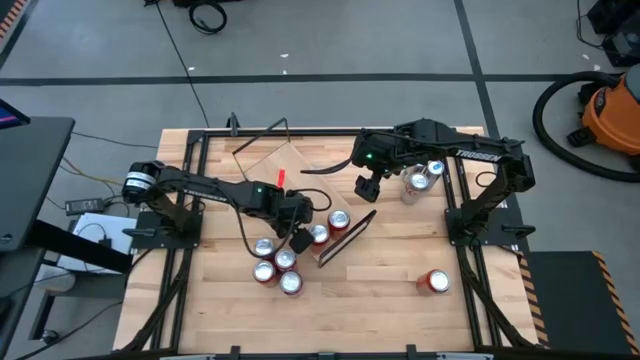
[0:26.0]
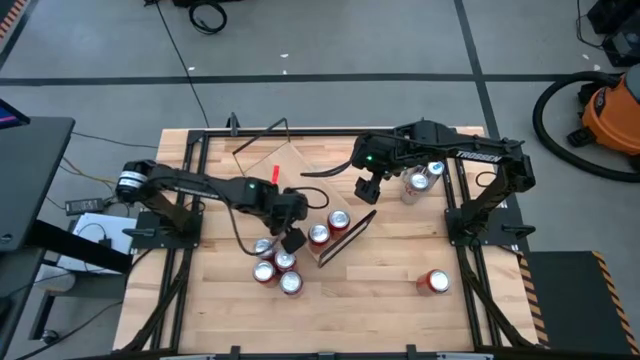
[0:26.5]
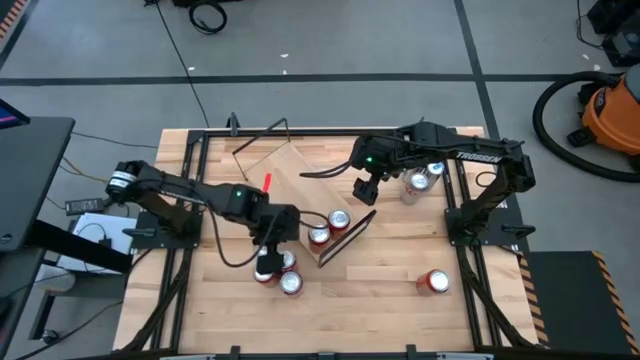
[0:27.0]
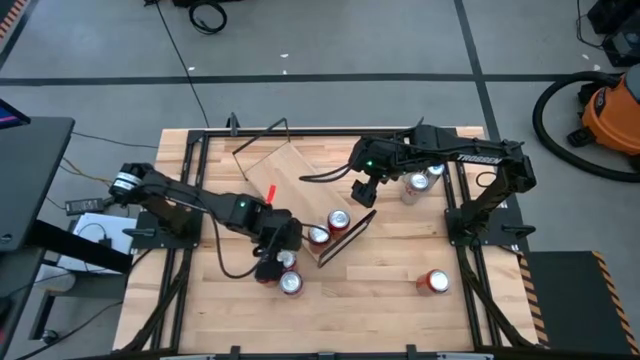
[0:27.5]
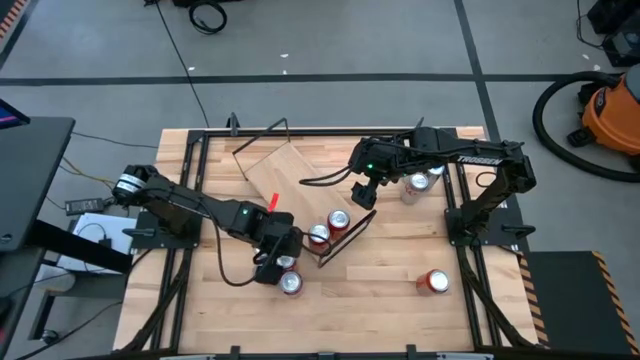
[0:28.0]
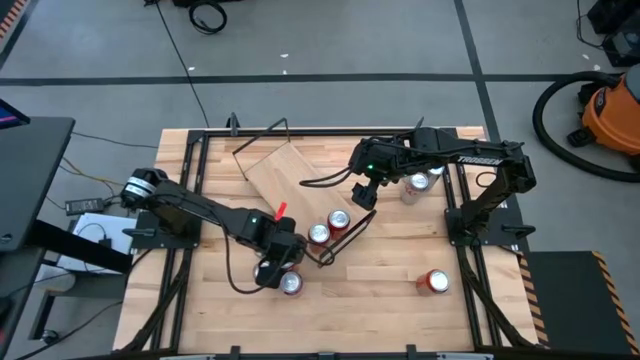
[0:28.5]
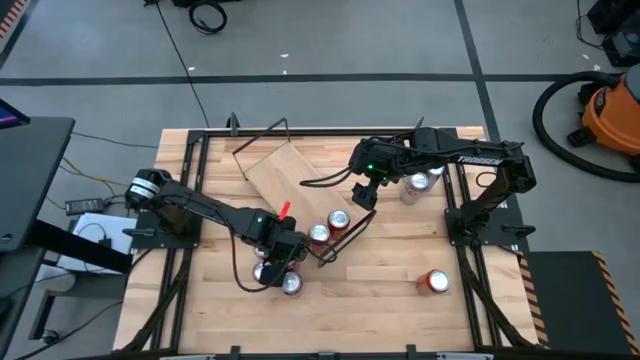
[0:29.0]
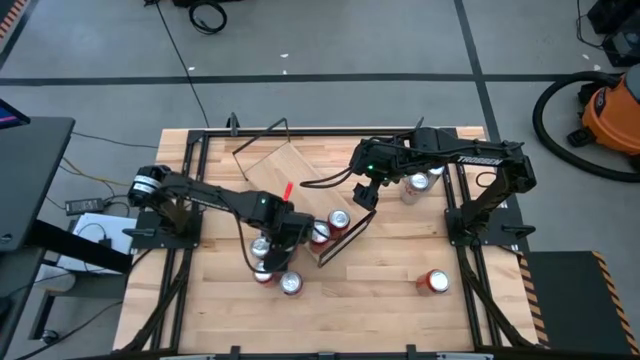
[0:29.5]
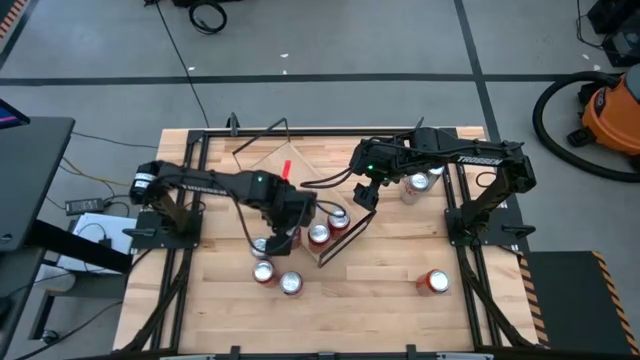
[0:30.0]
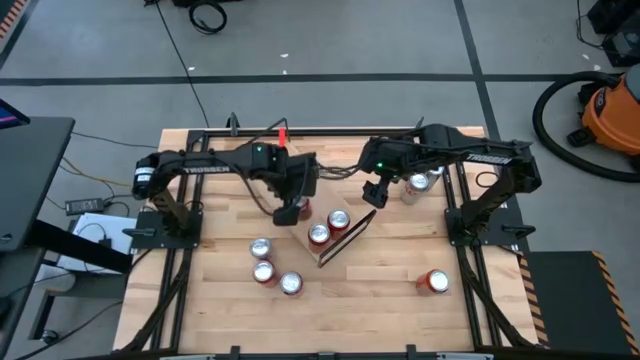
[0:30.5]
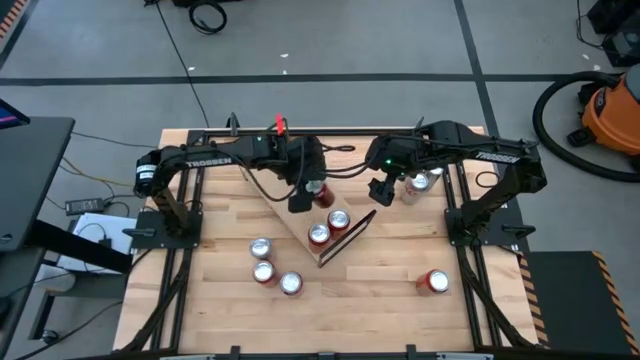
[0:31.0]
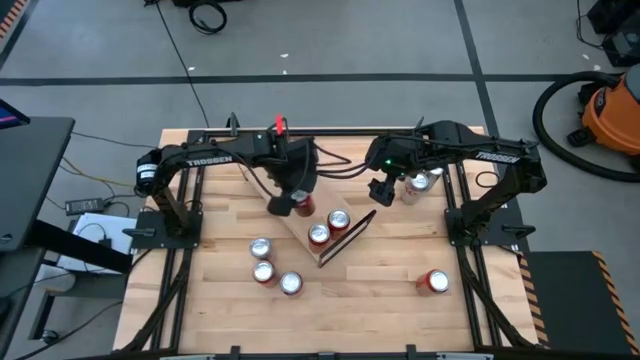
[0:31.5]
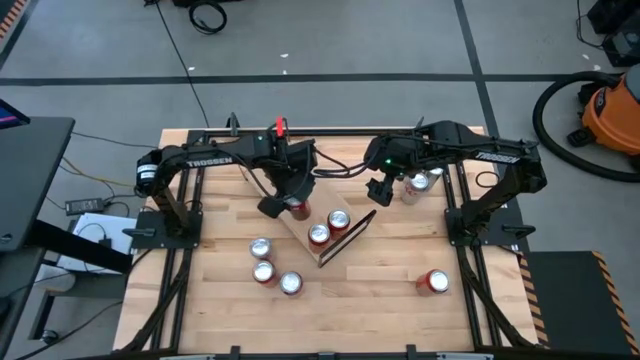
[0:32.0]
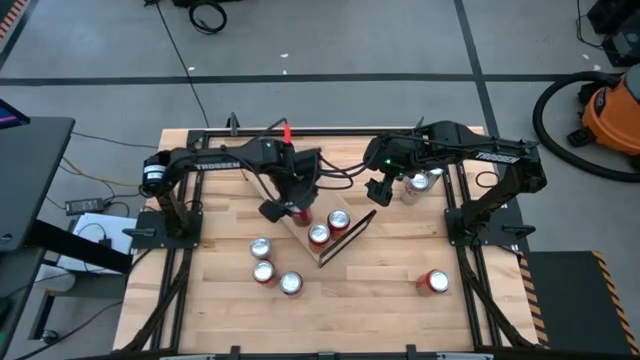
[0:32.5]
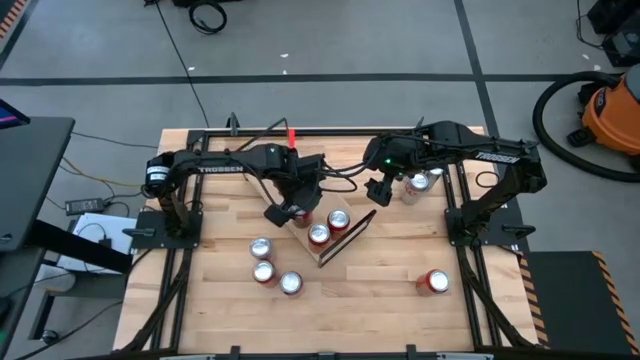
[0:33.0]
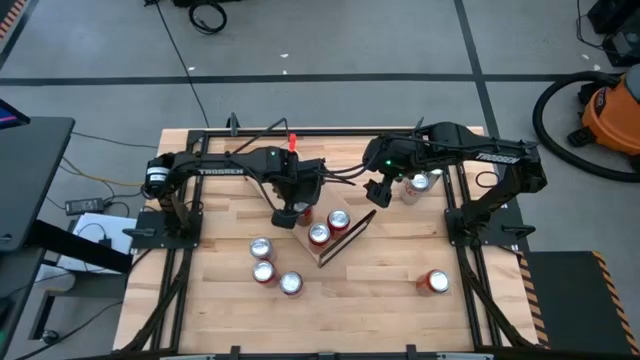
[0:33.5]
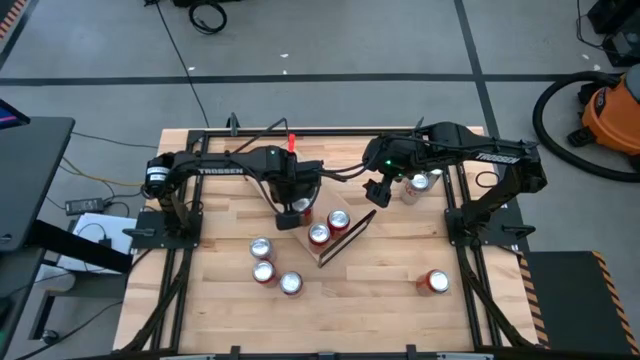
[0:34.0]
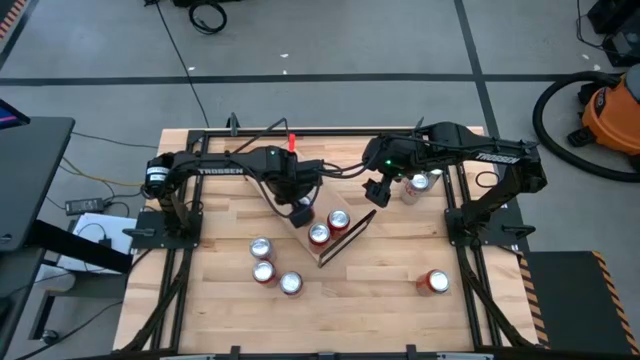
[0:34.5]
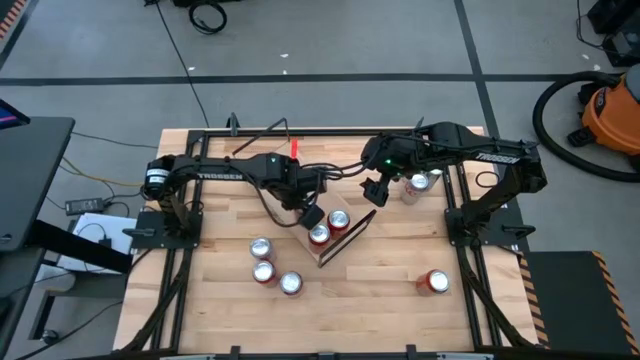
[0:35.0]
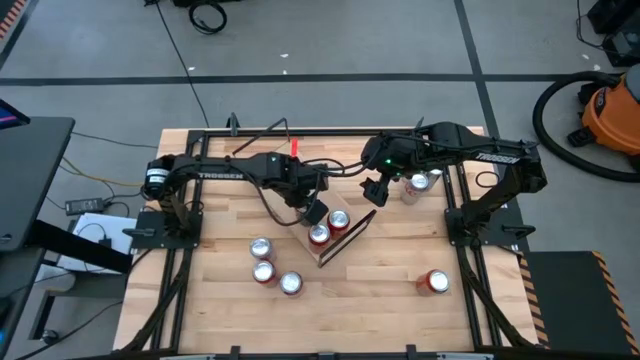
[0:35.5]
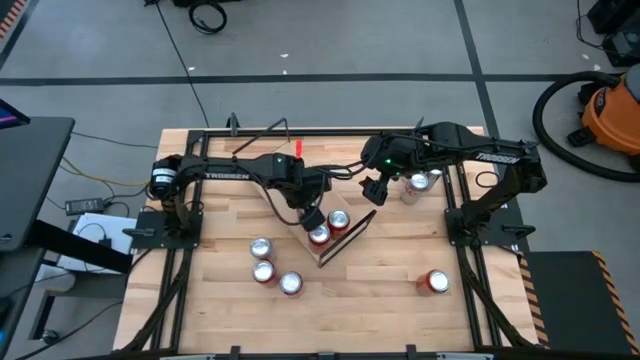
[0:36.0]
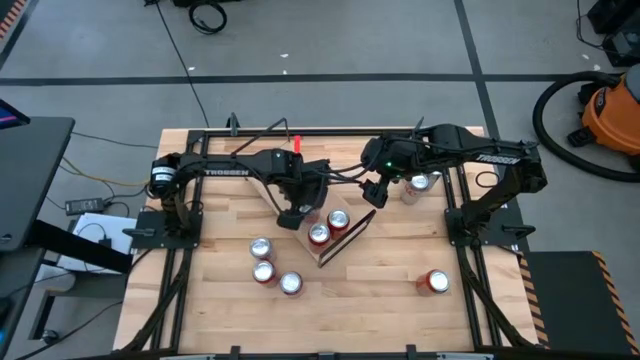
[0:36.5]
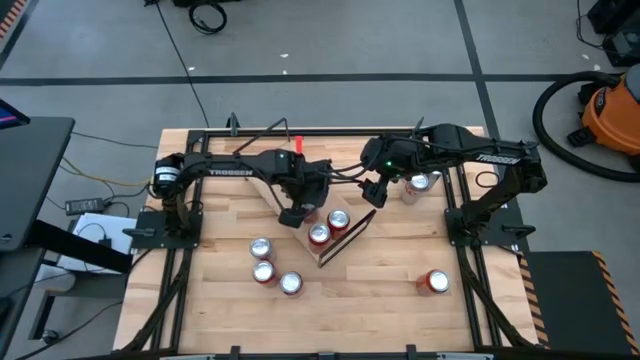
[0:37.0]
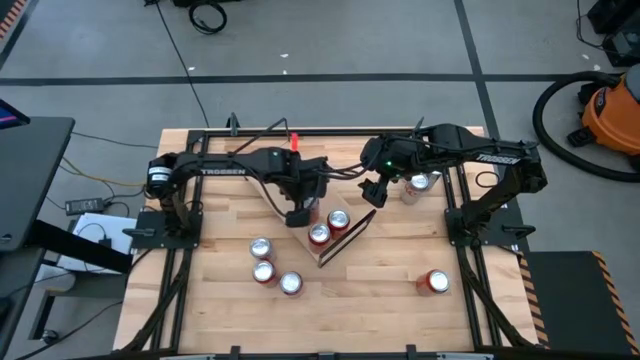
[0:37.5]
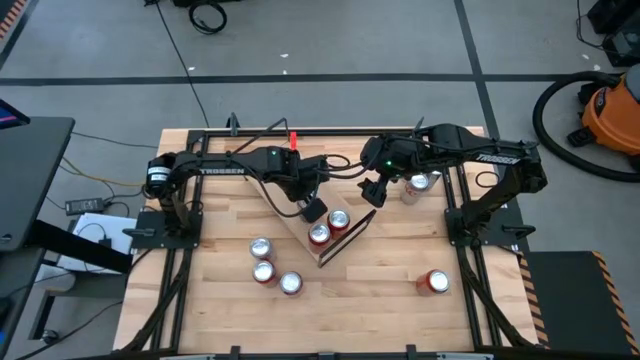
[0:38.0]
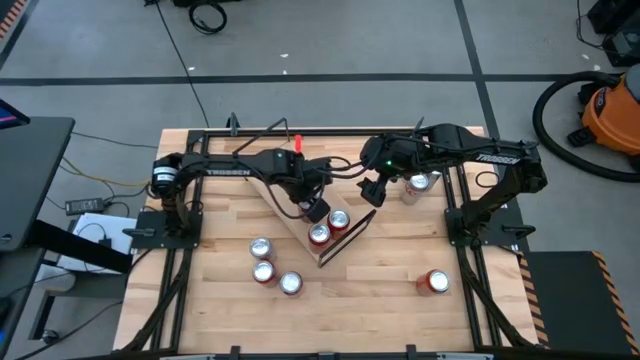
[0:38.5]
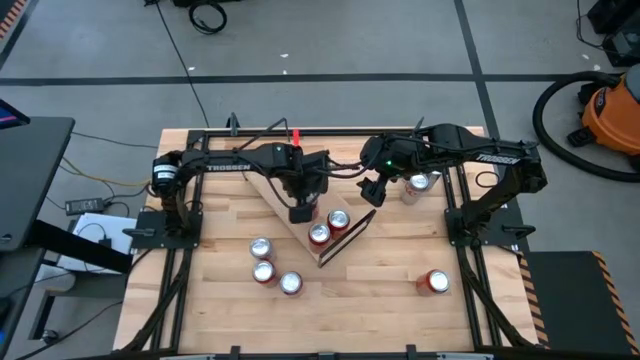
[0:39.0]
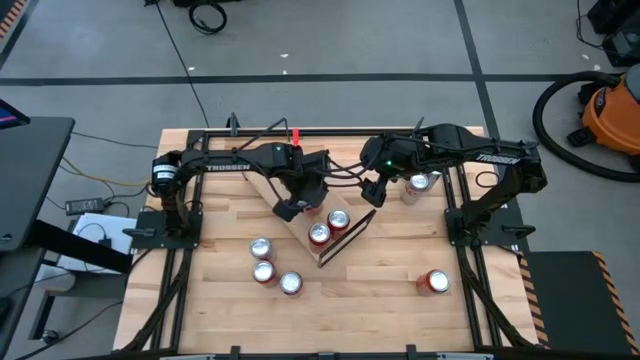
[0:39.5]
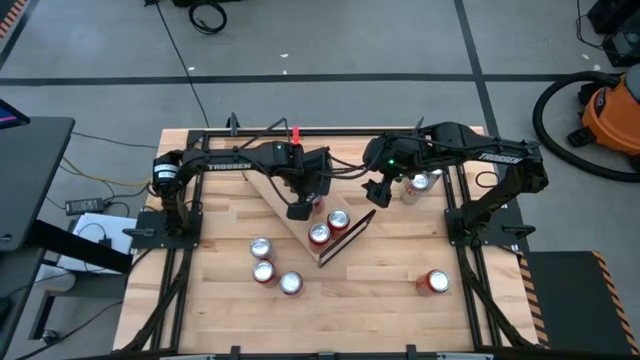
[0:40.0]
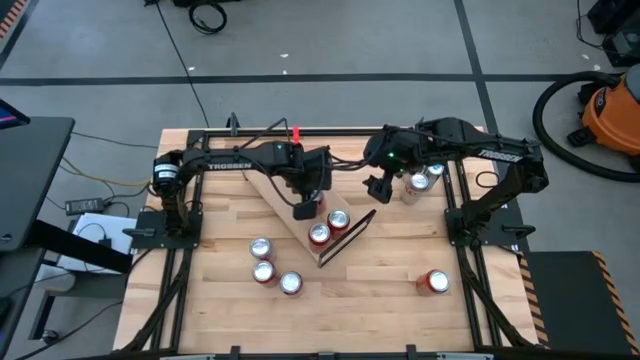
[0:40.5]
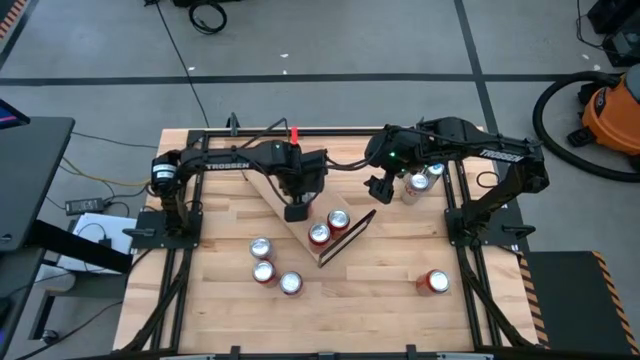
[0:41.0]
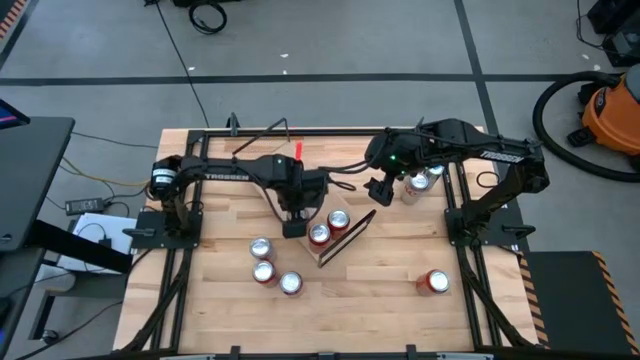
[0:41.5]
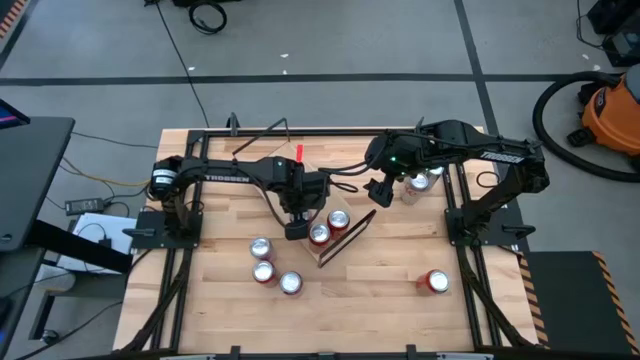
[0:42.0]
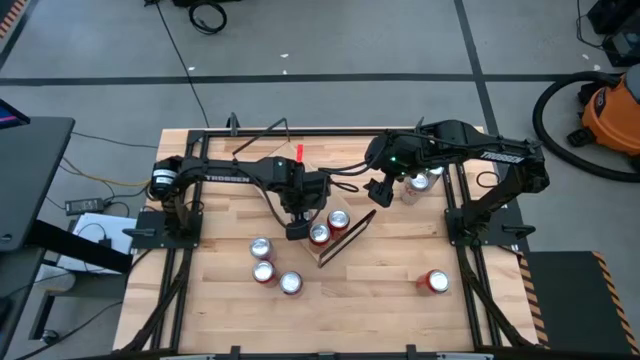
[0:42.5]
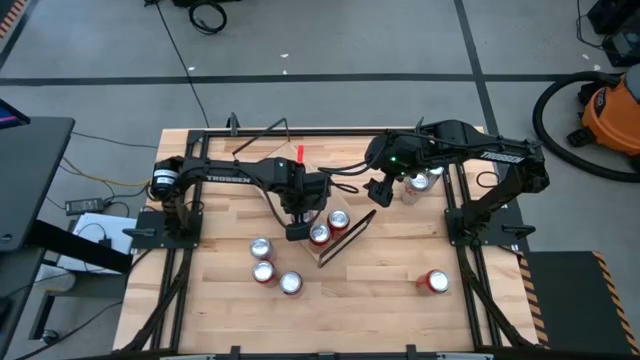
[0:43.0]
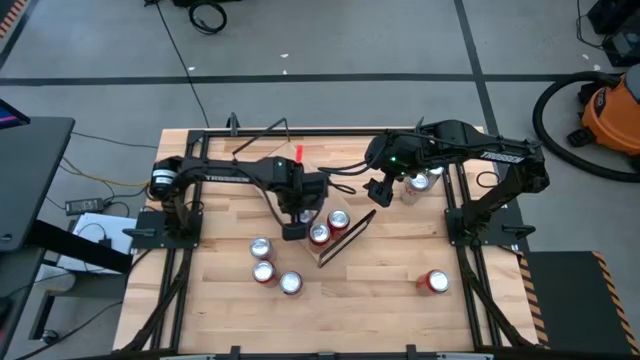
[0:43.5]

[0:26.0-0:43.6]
Task: Place canned beverage on shelf
Put the top red and white soda can on the shelf
